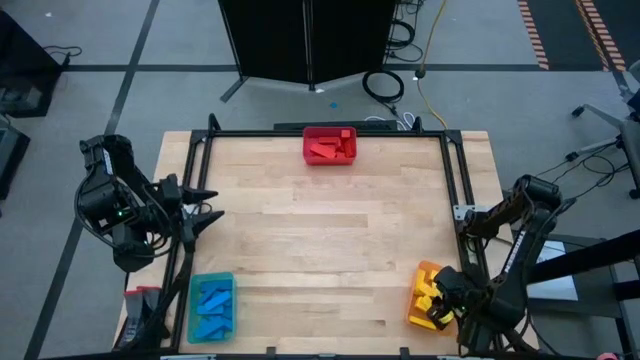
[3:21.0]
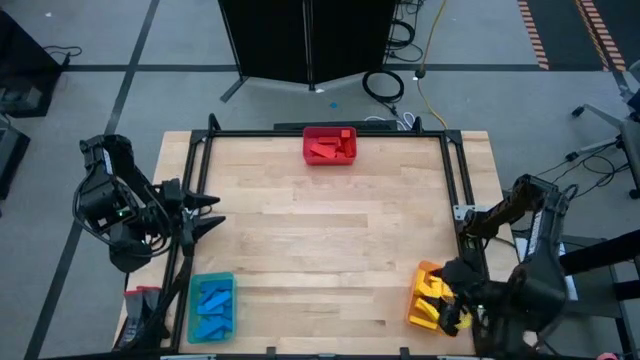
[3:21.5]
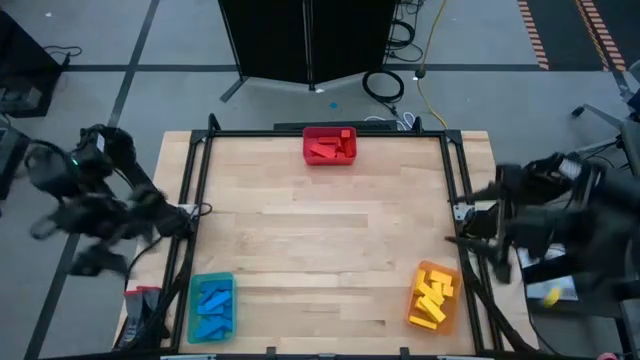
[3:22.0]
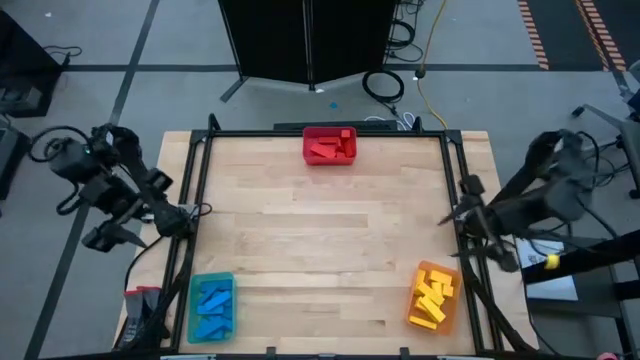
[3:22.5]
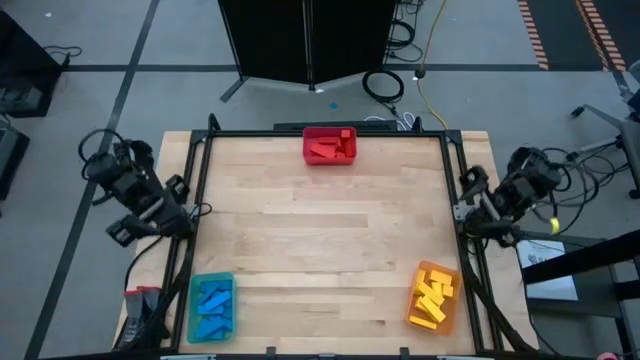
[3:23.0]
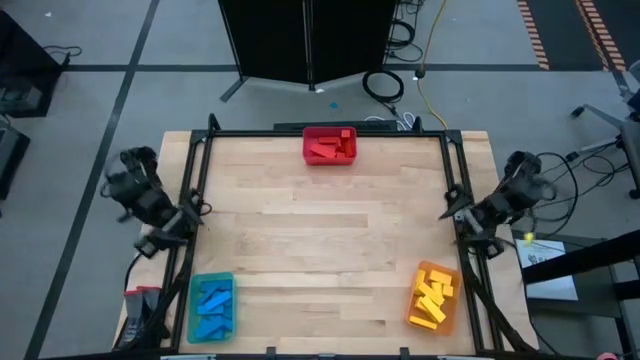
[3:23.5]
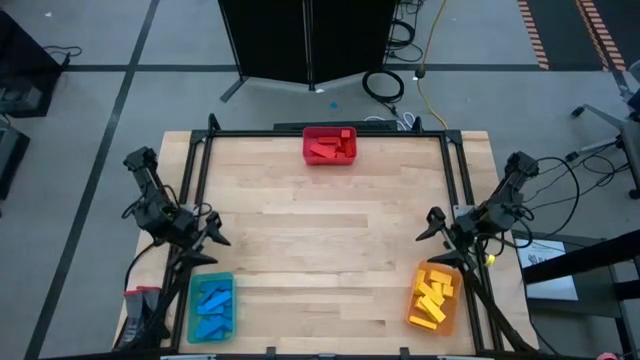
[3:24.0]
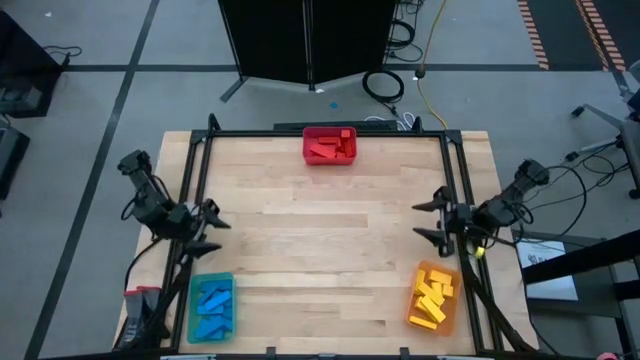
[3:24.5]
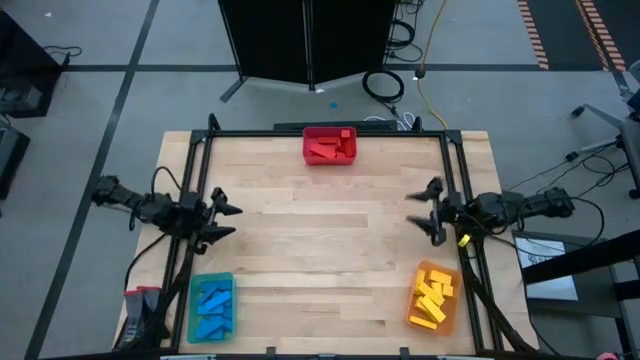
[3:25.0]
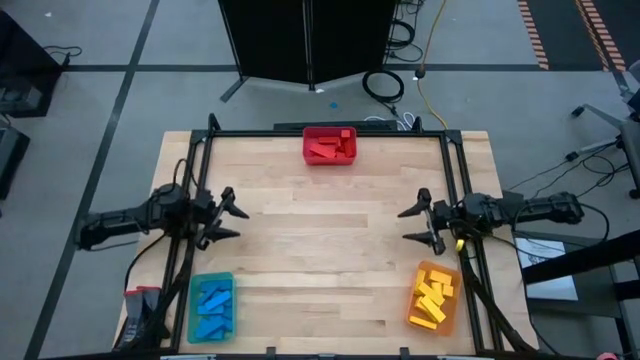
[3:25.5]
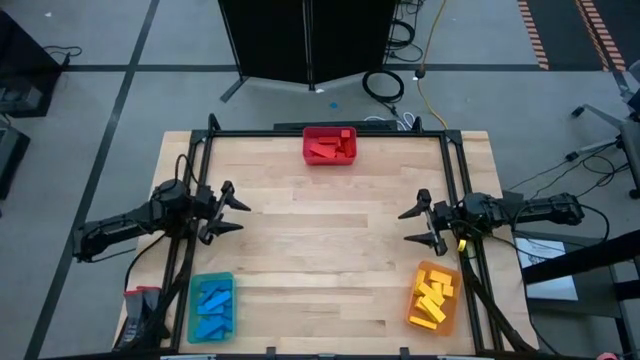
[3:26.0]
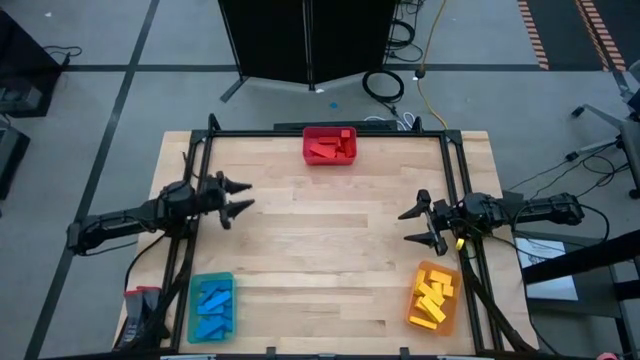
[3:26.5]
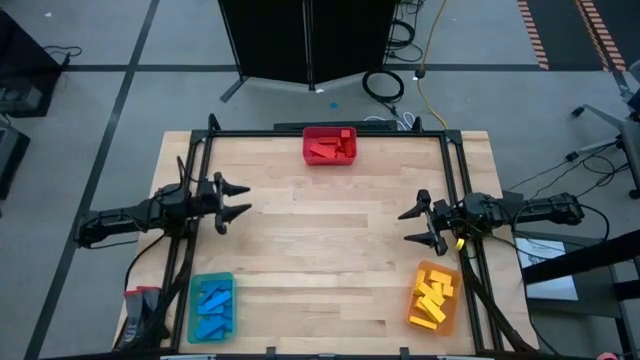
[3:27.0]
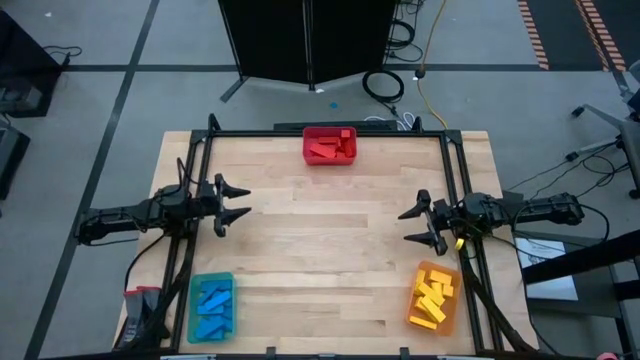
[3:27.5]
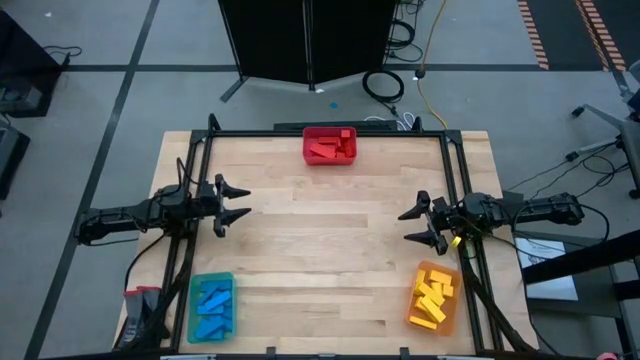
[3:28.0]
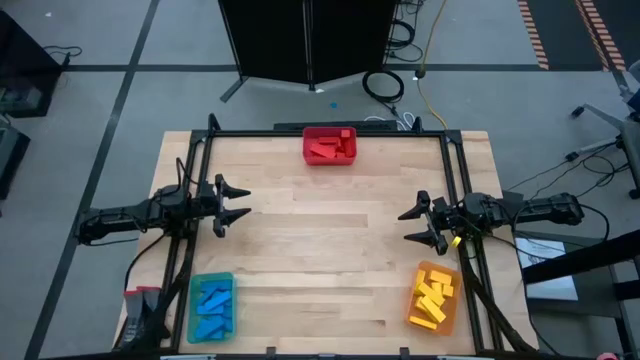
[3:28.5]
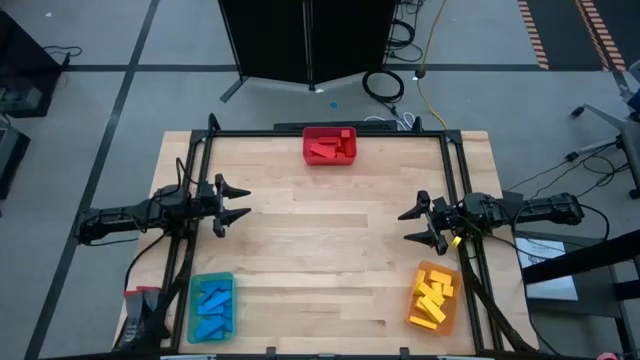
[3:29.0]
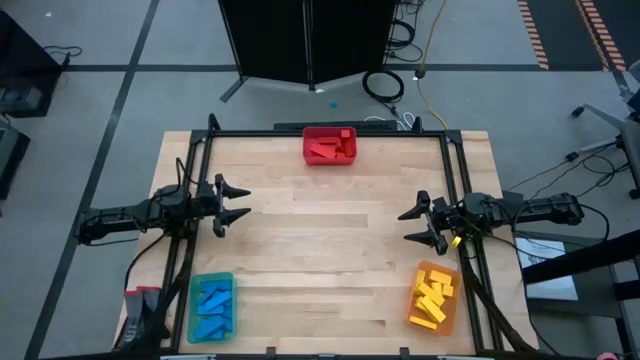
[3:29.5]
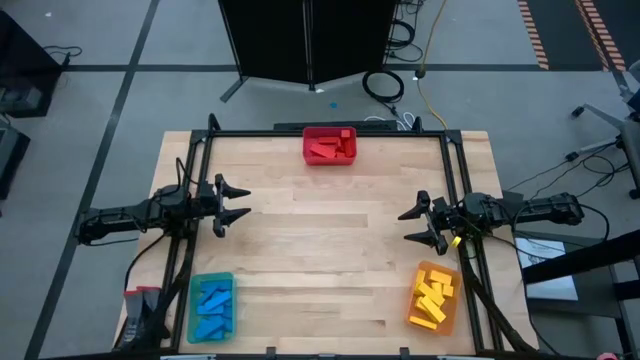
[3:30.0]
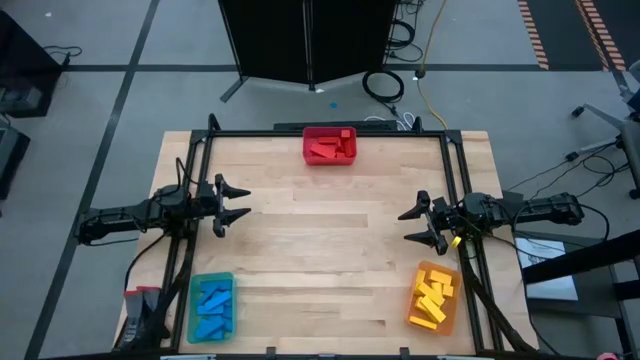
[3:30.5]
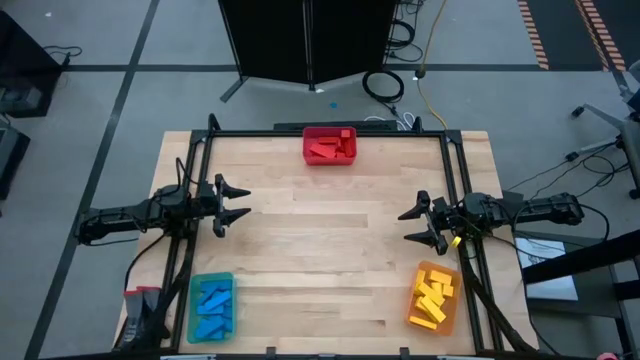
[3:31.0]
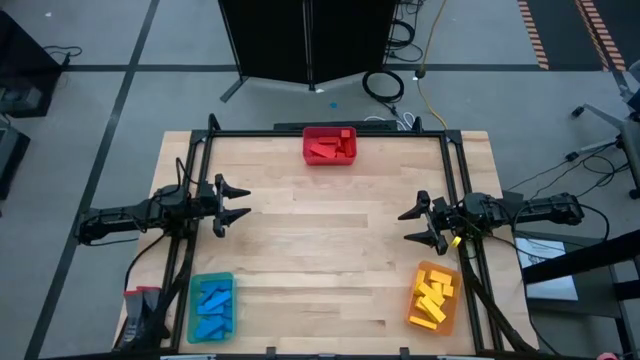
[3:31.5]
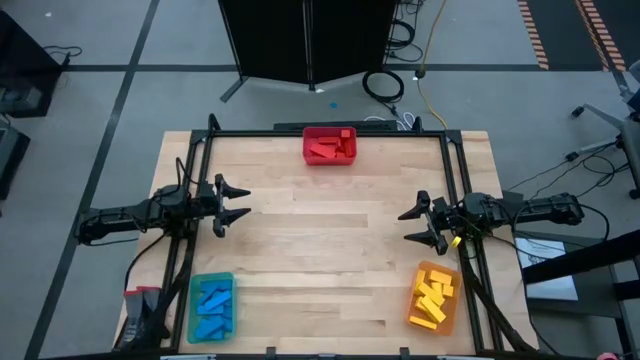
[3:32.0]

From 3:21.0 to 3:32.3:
Task: Sort blocks
Return to Home Position
